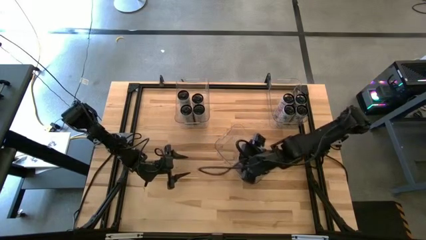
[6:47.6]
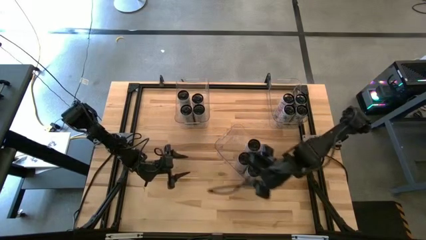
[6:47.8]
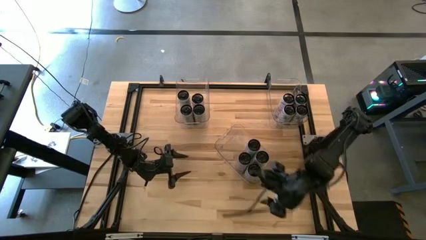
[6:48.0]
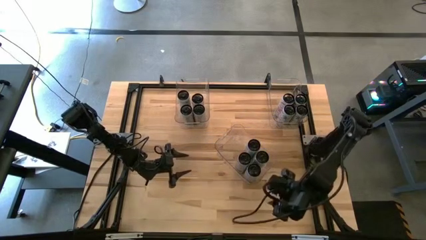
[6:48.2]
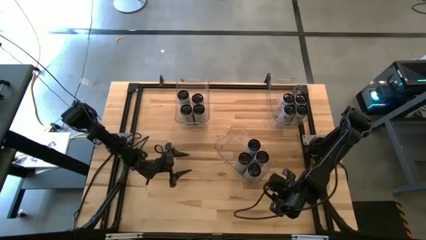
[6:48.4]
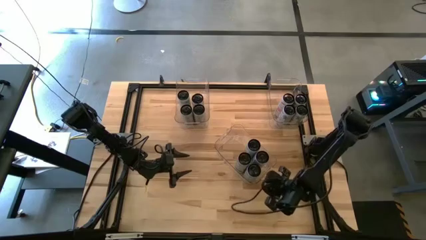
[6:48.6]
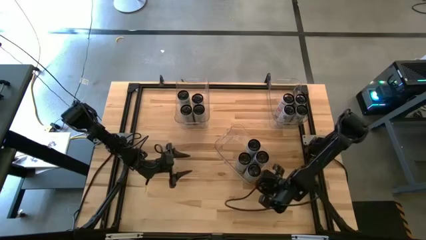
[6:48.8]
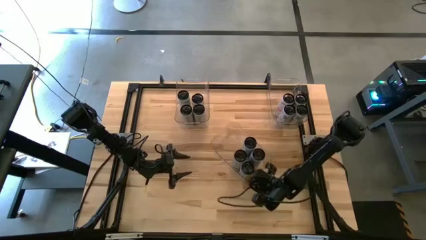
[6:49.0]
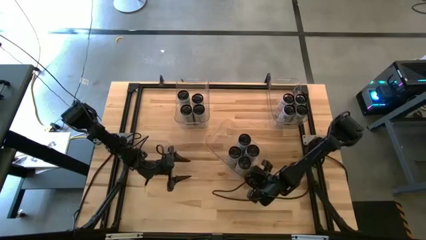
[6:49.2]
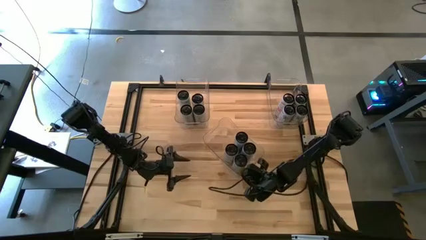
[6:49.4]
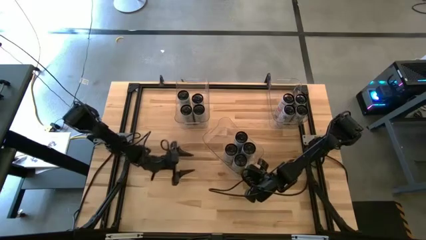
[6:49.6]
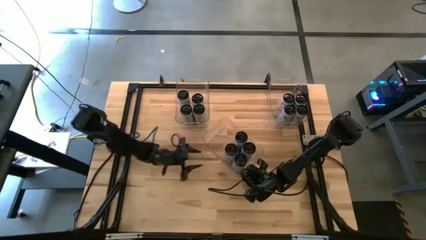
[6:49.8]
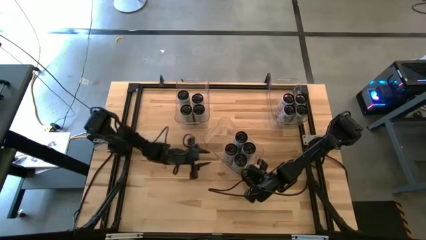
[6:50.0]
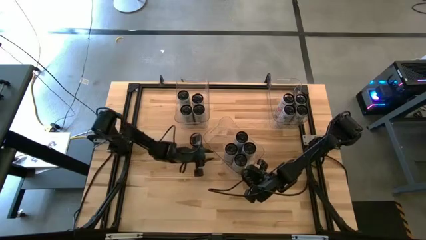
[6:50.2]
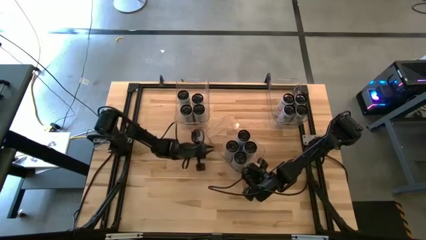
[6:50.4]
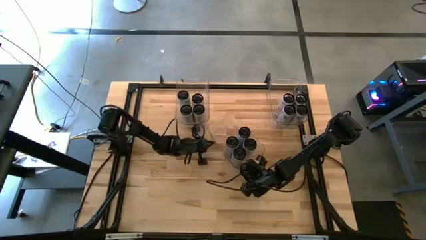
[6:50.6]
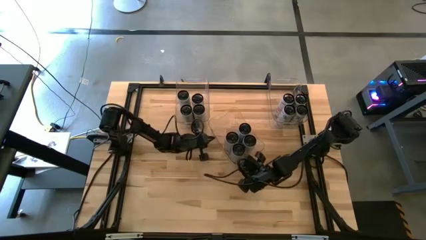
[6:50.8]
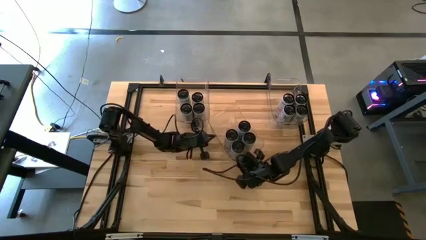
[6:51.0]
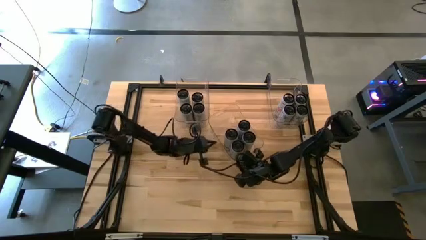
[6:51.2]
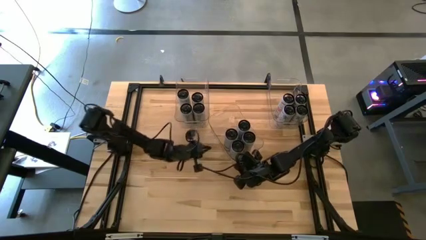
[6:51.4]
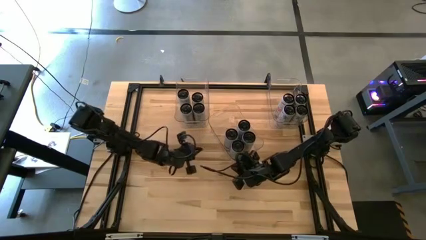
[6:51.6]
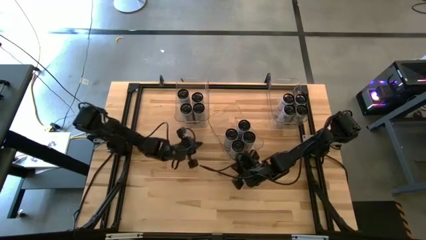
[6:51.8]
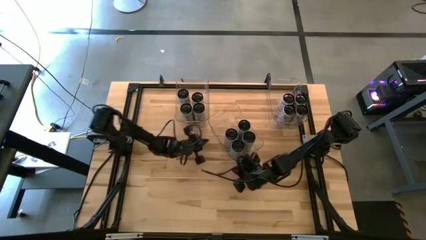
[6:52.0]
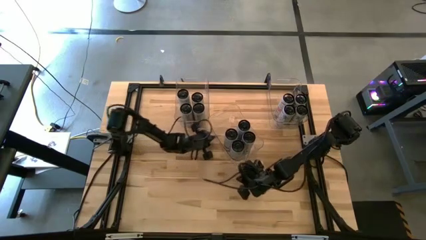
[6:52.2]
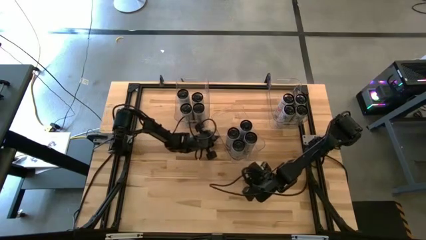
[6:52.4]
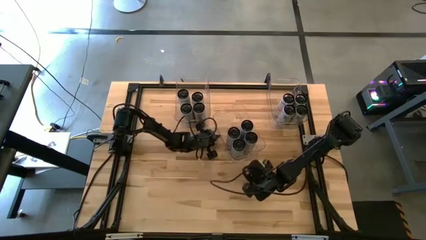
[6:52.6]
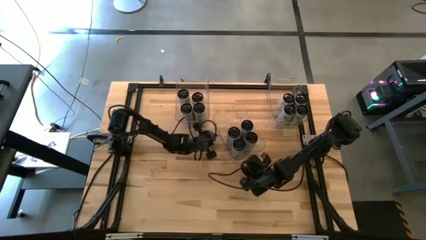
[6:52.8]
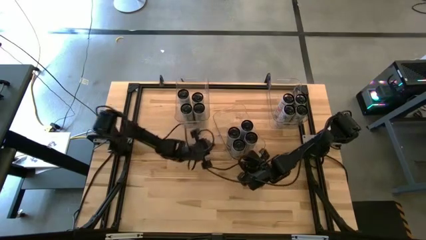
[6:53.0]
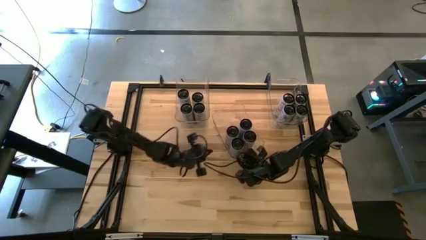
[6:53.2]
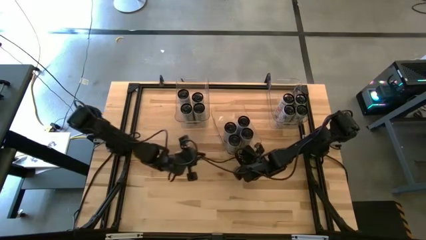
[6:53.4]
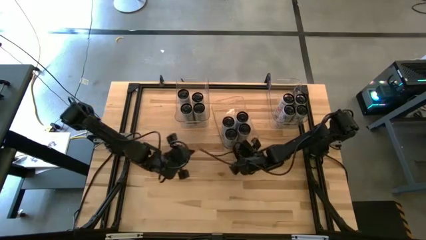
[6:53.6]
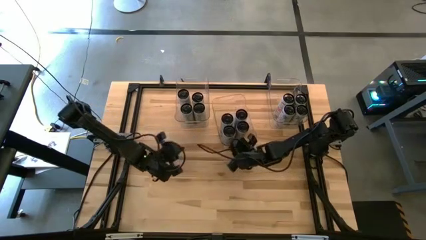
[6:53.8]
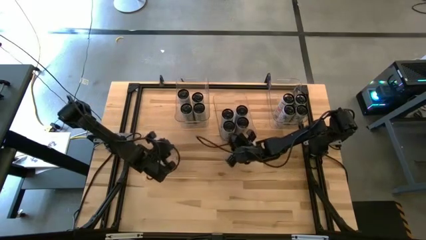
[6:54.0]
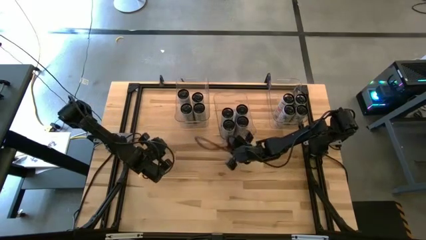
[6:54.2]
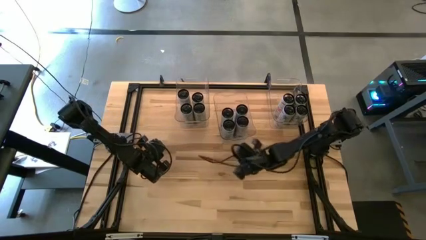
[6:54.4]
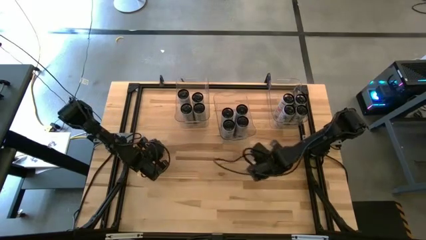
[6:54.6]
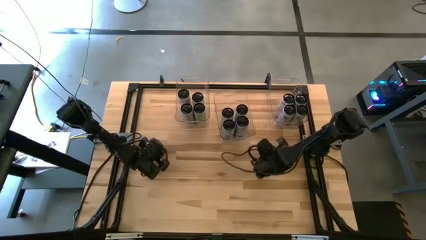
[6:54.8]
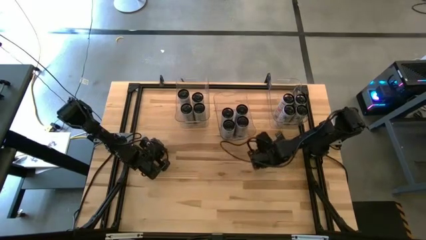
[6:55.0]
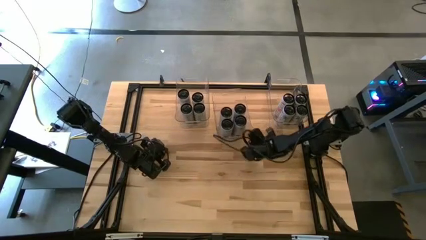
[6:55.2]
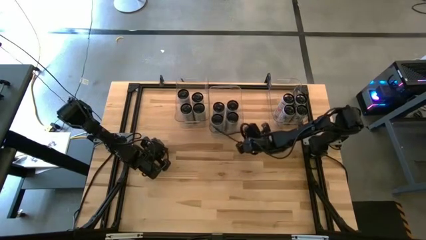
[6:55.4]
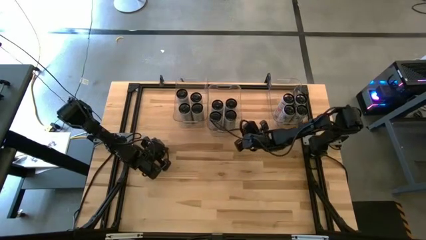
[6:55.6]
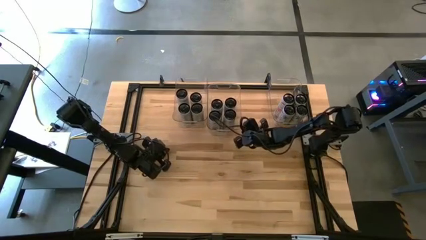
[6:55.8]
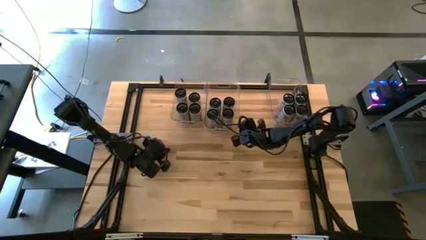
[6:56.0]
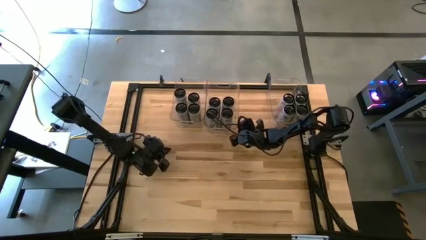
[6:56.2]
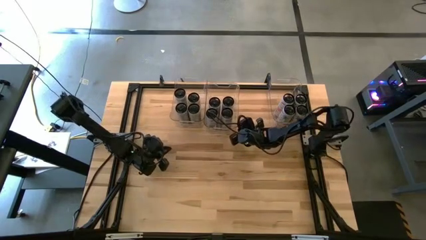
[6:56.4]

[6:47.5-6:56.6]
Task: Sort soda cans
Move the transparent bin to the top center of the table

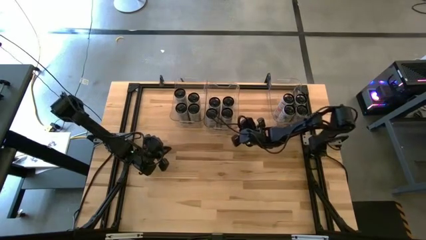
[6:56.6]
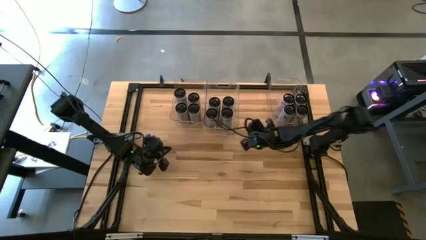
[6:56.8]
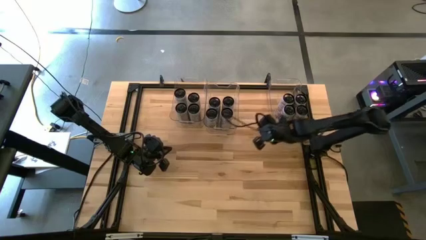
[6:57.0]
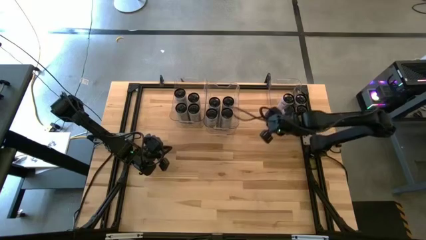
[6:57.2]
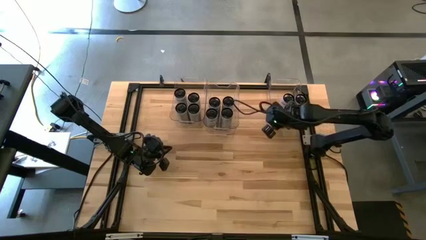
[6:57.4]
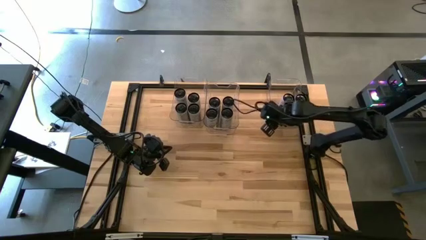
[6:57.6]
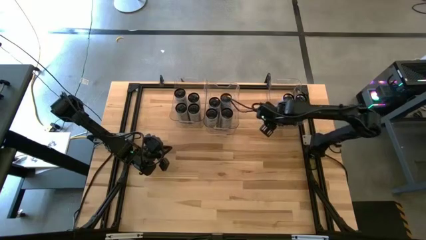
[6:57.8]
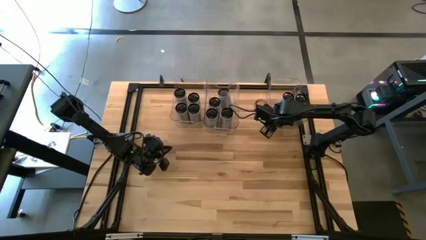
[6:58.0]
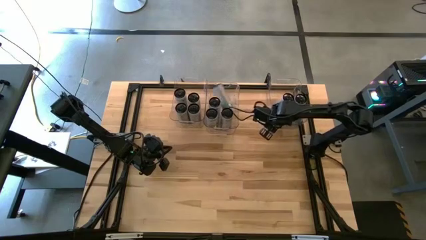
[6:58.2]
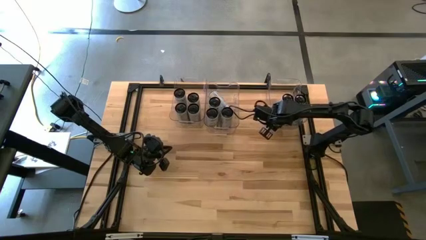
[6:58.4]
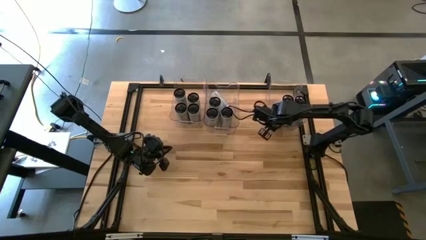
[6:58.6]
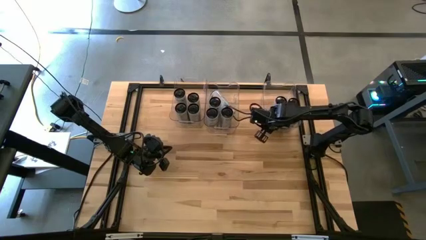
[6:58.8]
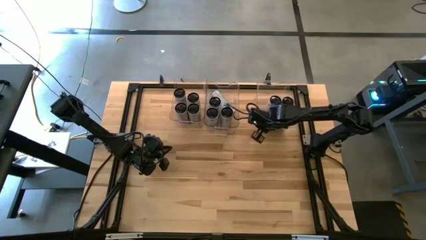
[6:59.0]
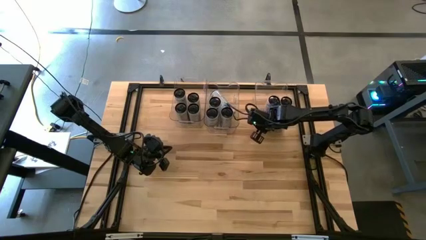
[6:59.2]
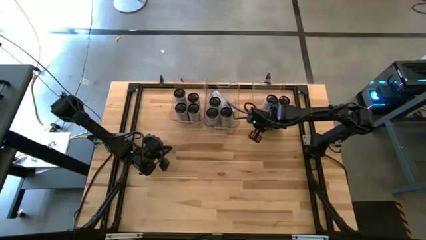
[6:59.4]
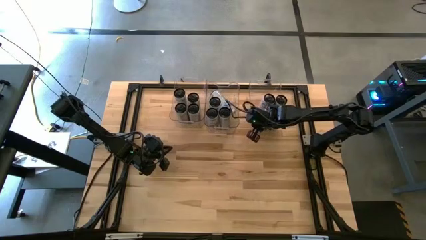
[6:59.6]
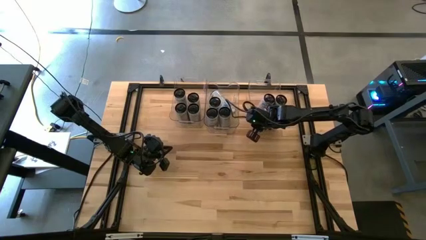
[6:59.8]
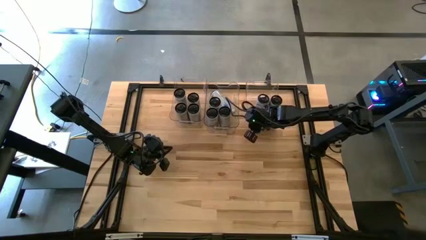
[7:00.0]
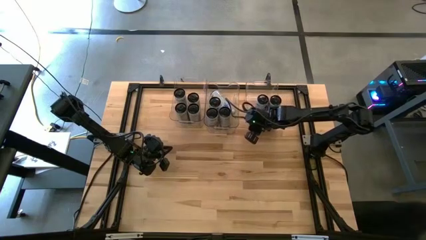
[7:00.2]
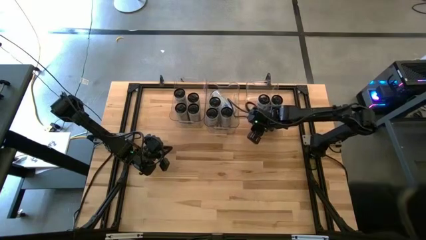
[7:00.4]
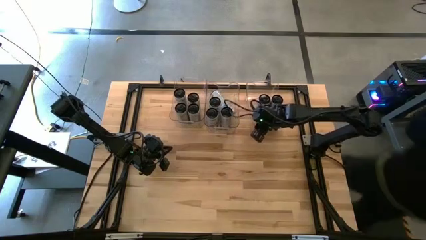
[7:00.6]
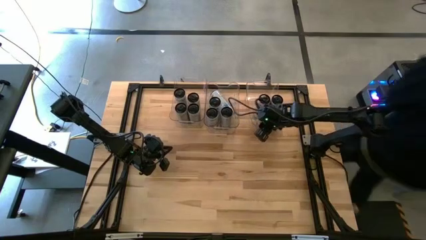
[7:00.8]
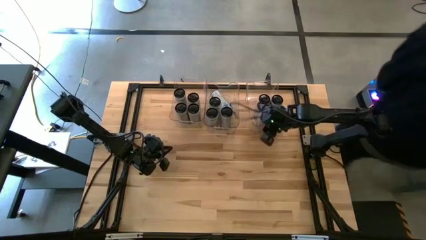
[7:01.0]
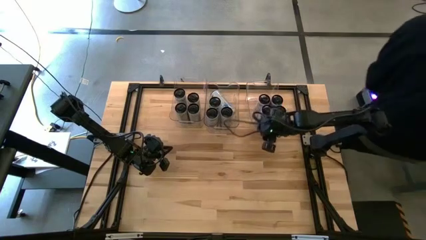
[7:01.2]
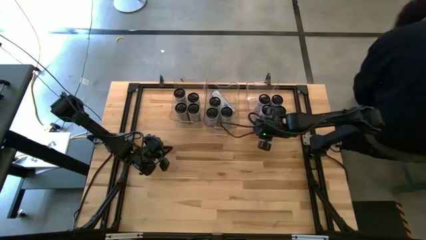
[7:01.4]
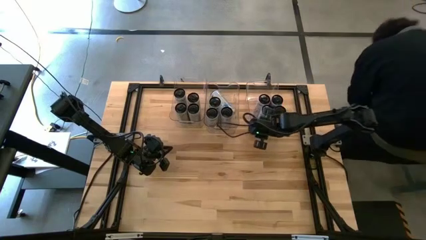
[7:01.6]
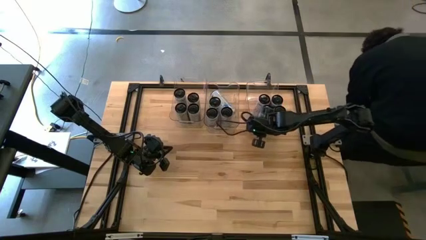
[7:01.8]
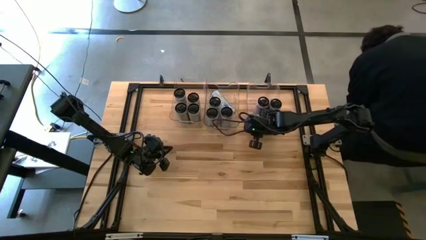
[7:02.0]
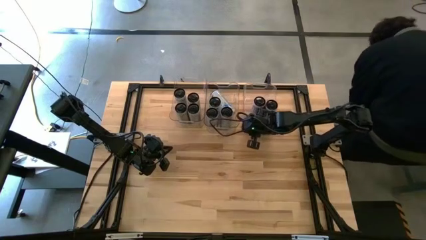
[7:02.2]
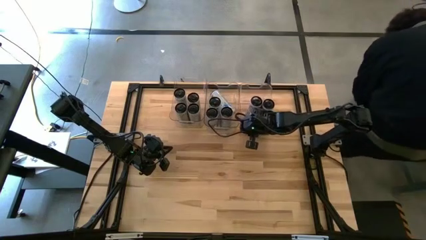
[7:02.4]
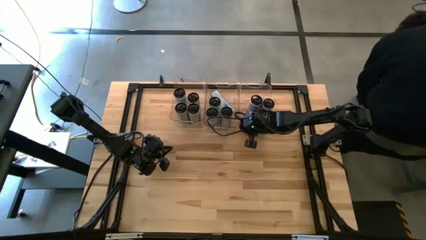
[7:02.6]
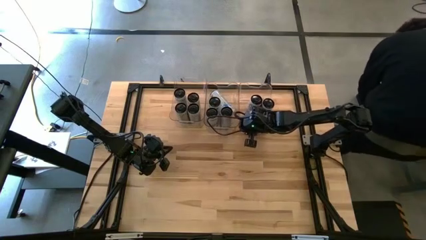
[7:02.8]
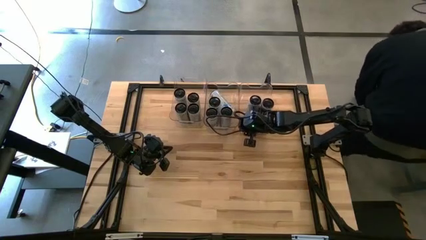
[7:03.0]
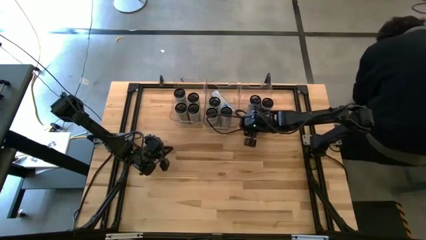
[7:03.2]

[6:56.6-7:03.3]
Adjust the top right transparent bin
